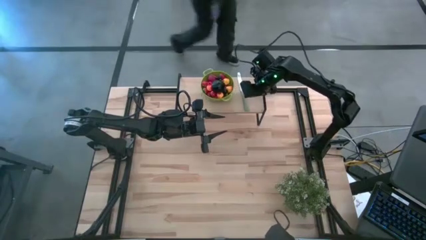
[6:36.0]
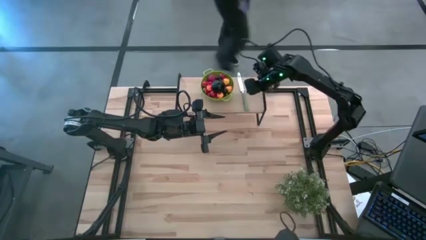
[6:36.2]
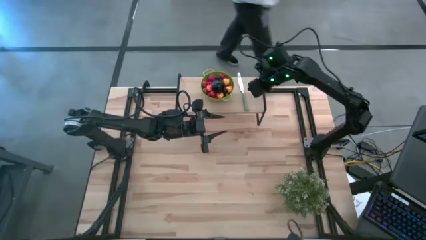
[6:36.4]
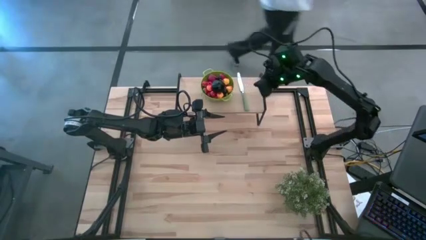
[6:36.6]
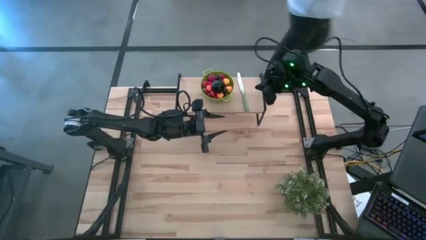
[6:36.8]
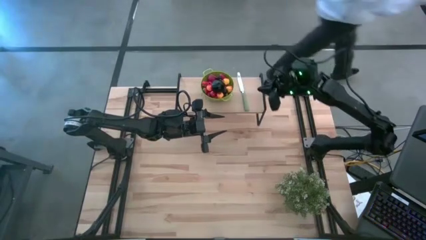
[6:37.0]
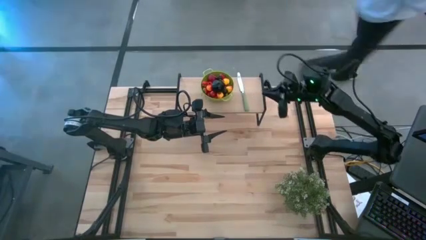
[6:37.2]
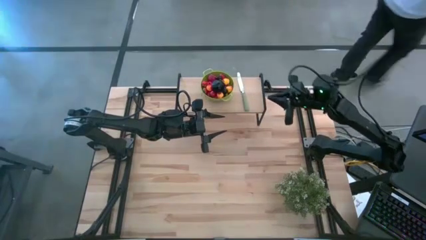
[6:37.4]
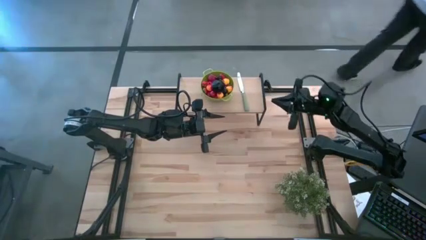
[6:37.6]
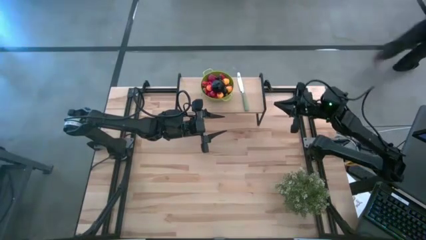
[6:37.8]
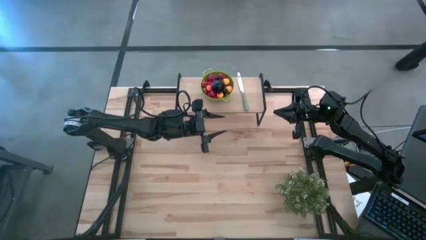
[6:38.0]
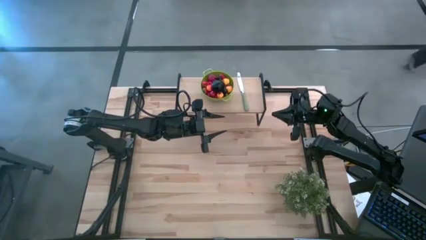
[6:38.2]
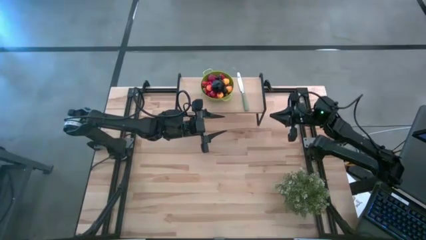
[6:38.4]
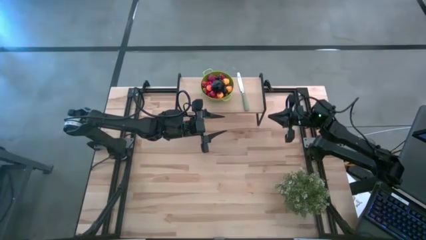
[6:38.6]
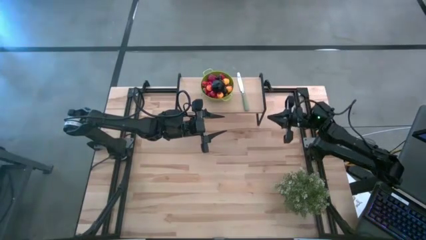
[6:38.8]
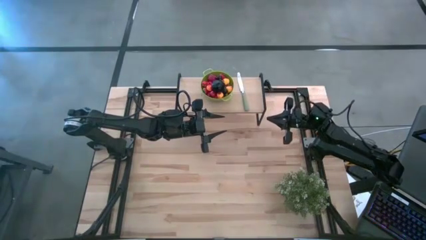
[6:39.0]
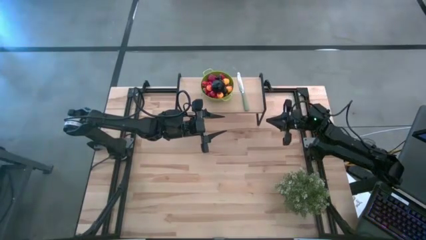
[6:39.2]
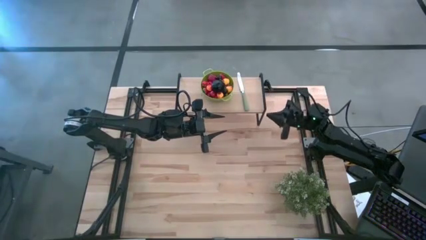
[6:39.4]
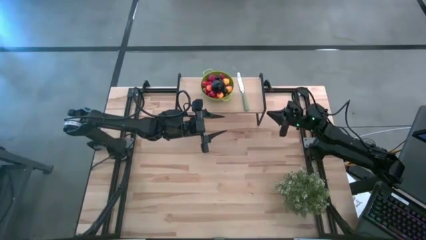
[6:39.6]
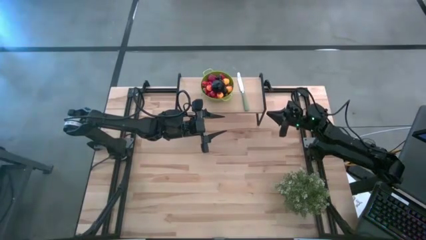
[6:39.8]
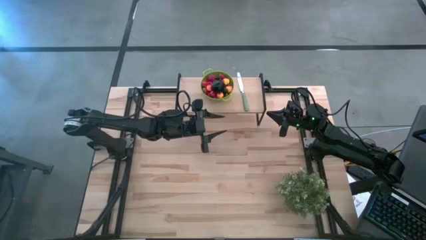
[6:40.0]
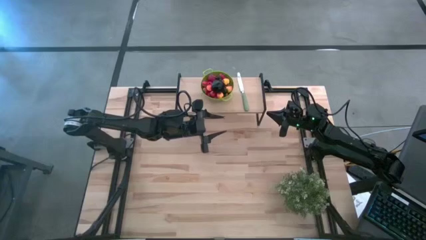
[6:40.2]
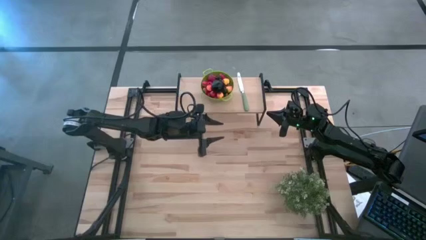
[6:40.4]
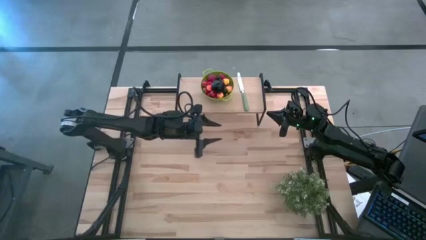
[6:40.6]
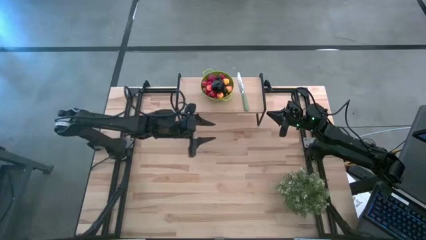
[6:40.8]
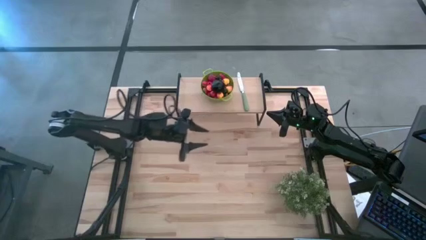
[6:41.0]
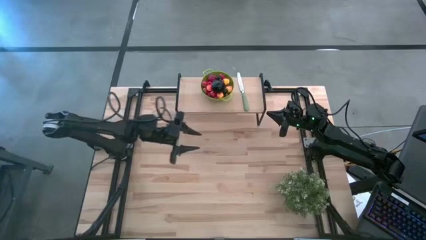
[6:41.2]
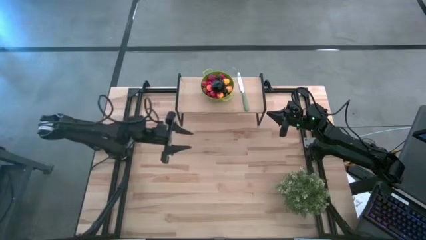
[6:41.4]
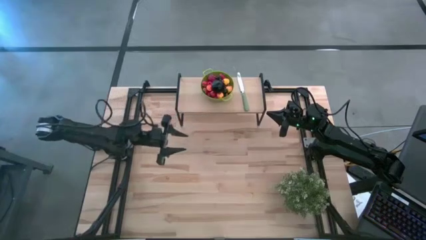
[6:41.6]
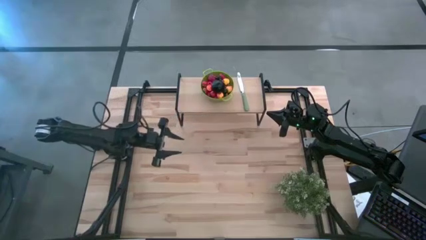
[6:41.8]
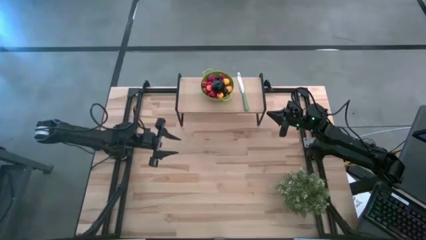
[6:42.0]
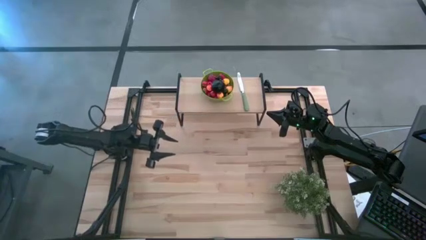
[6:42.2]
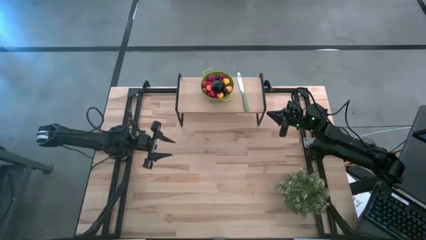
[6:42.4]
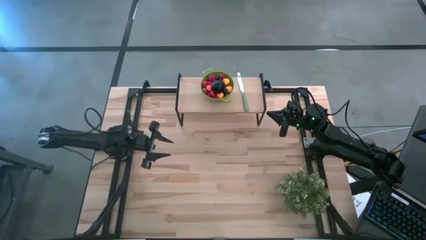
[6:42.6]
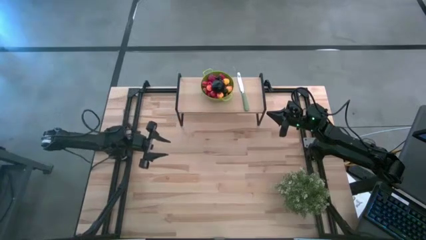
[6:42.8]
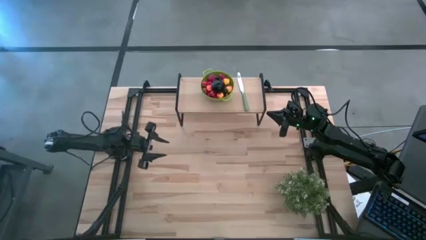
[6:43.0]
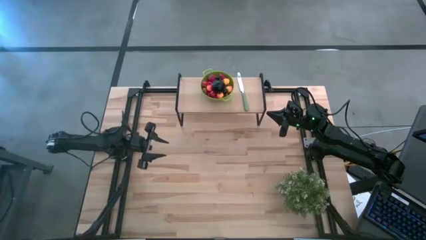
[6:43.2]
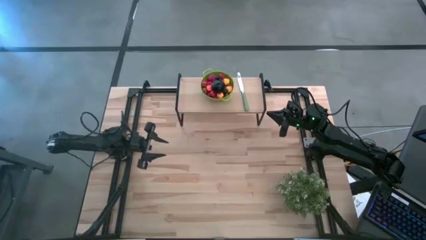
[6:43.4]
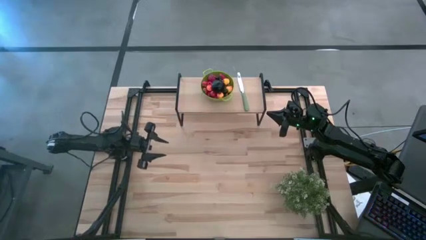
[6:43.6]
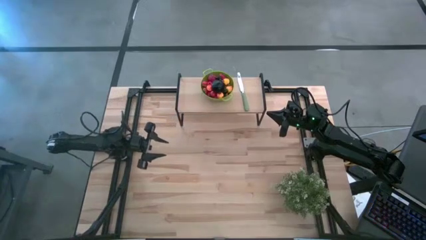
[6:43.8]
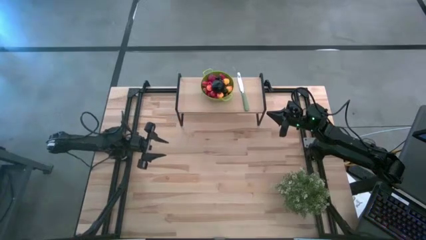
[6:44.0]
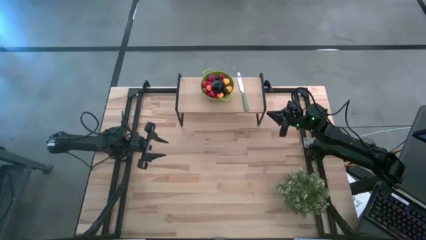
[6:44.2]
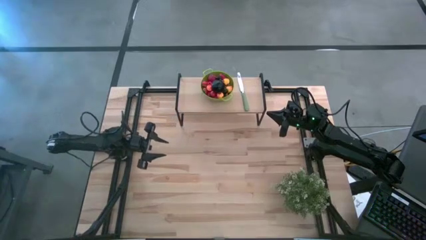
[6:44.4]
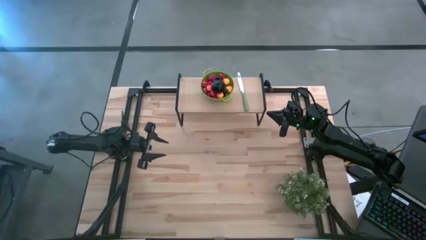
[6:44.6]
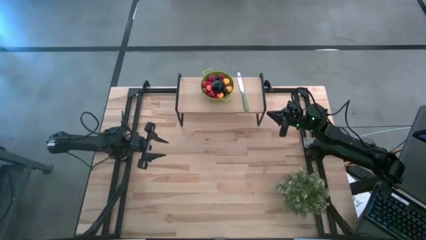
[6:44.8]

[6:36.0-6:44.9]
Task: Pick & Place Fruit
Return to Home Position

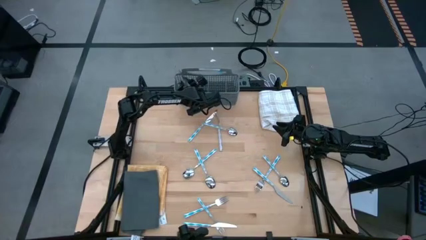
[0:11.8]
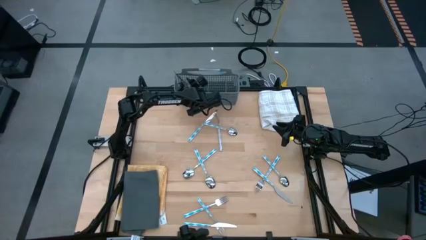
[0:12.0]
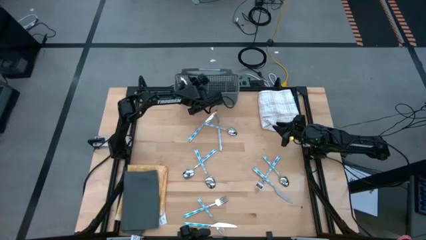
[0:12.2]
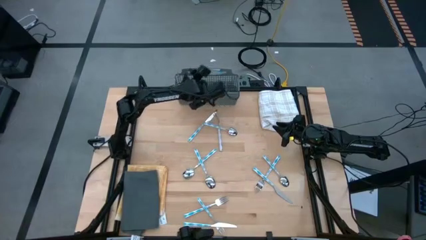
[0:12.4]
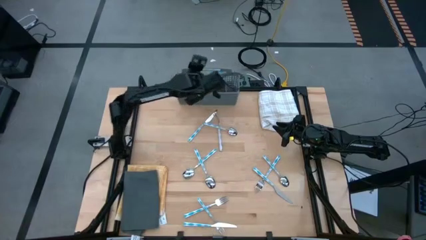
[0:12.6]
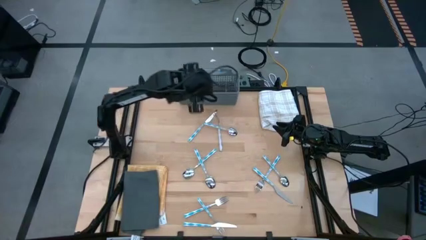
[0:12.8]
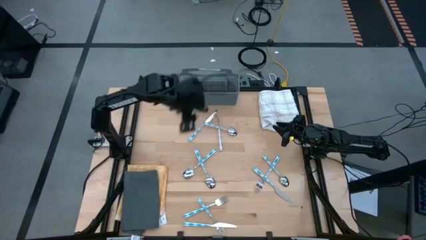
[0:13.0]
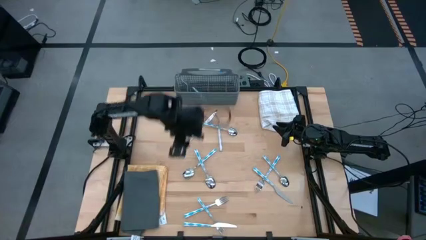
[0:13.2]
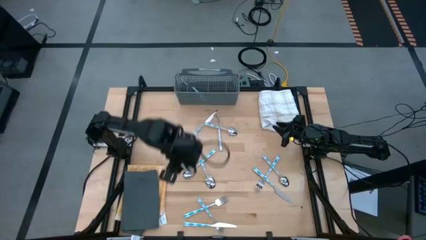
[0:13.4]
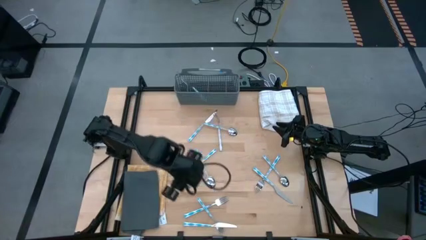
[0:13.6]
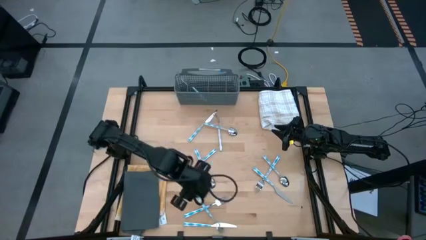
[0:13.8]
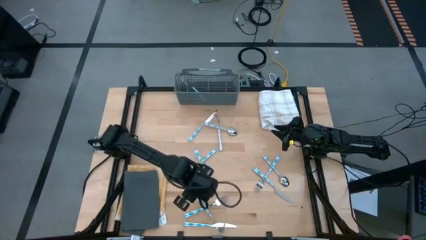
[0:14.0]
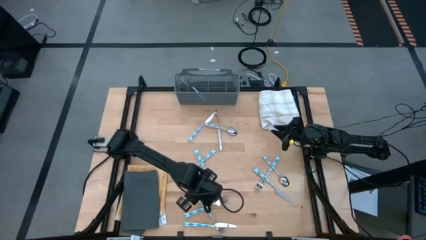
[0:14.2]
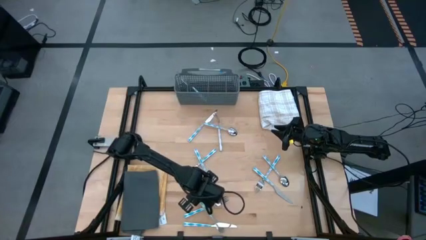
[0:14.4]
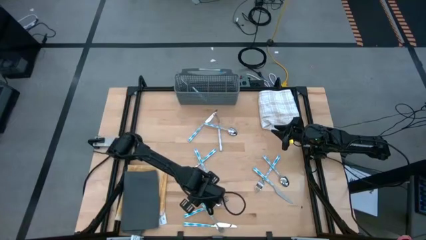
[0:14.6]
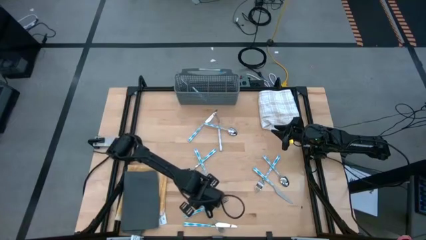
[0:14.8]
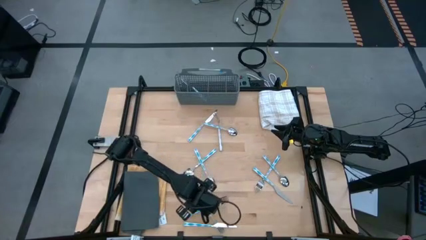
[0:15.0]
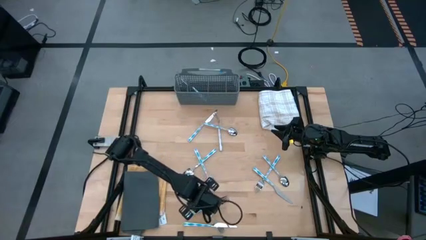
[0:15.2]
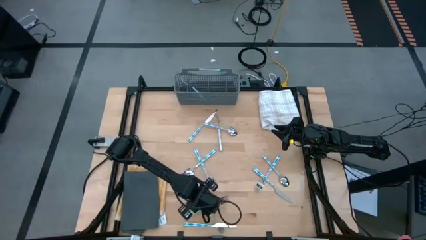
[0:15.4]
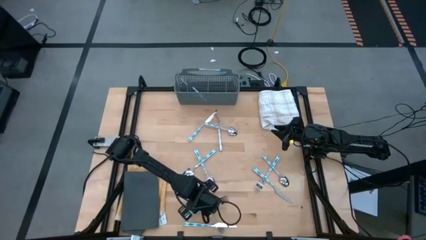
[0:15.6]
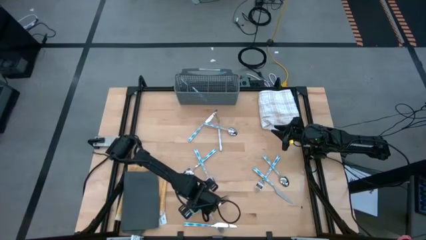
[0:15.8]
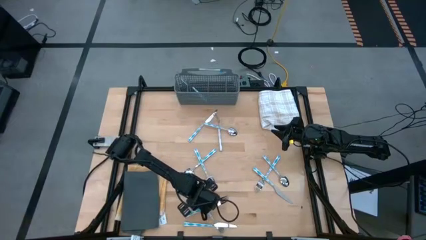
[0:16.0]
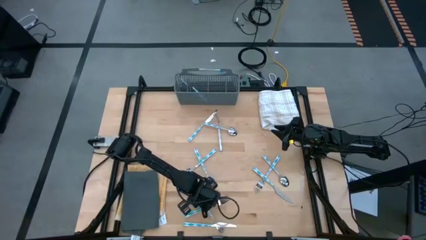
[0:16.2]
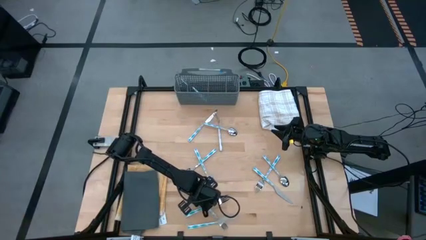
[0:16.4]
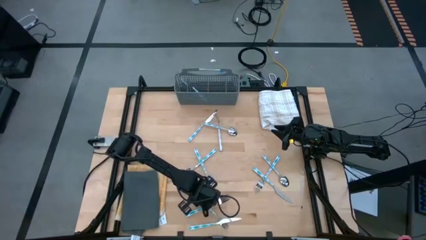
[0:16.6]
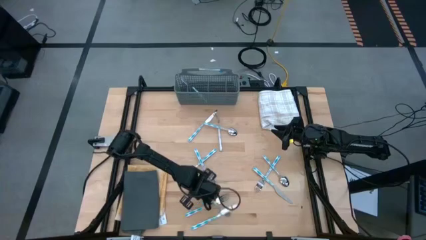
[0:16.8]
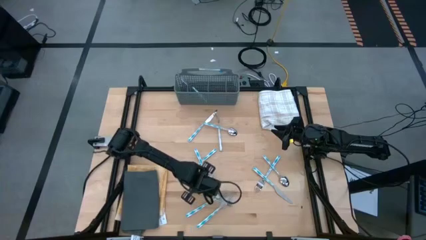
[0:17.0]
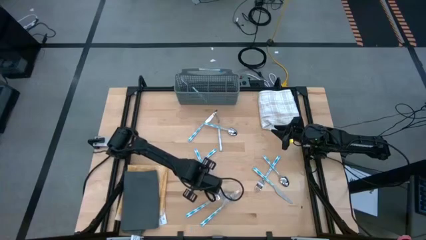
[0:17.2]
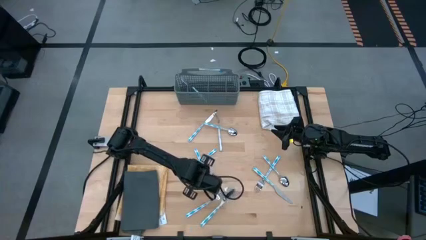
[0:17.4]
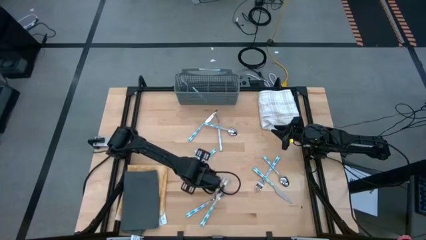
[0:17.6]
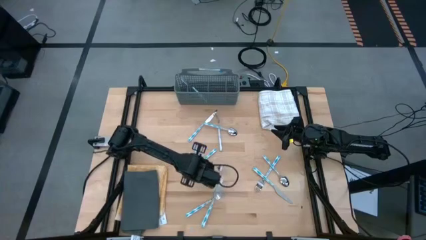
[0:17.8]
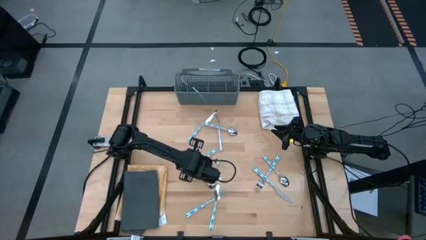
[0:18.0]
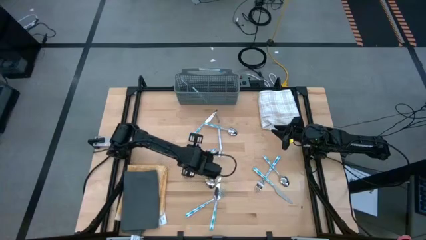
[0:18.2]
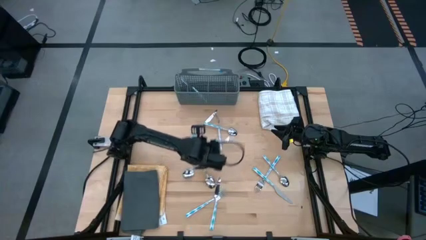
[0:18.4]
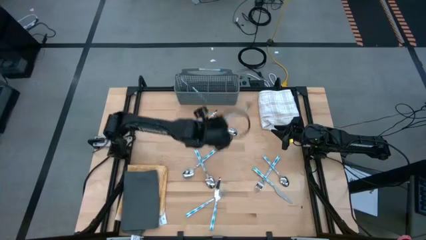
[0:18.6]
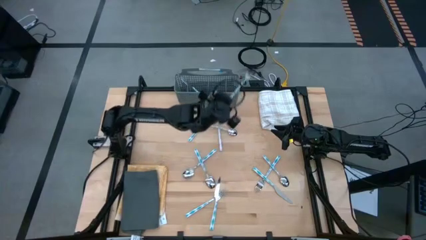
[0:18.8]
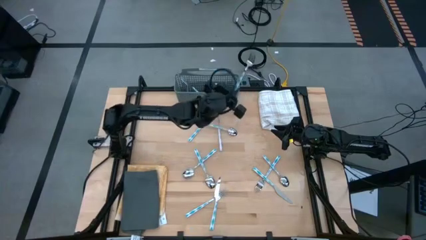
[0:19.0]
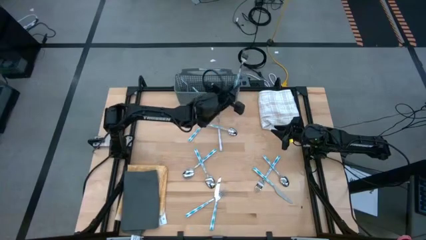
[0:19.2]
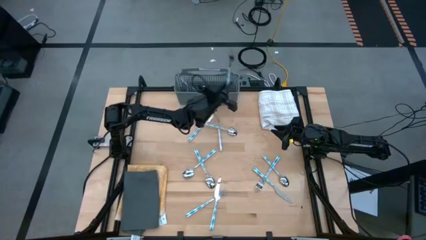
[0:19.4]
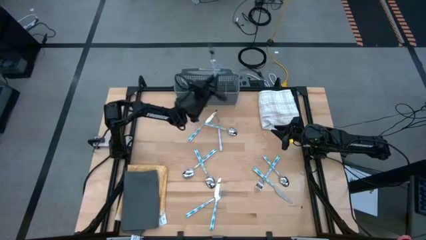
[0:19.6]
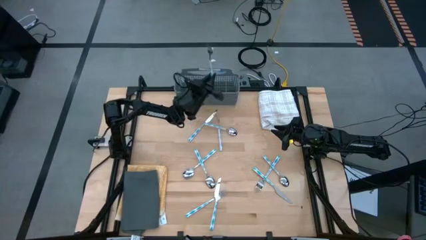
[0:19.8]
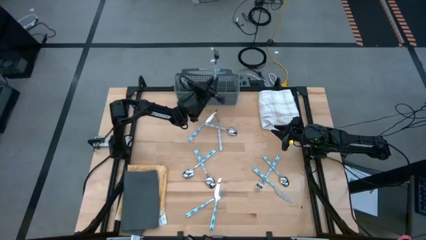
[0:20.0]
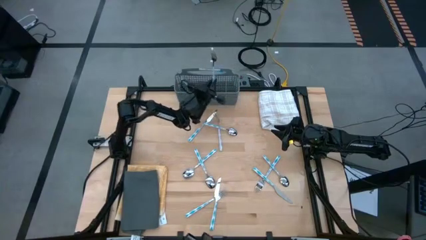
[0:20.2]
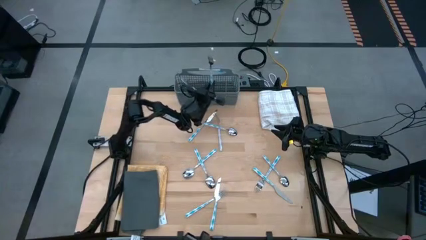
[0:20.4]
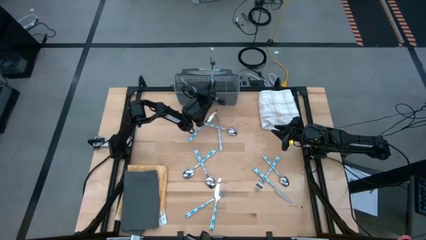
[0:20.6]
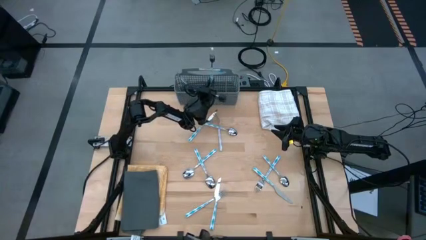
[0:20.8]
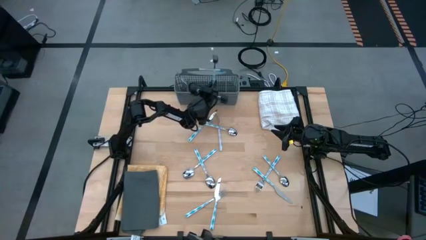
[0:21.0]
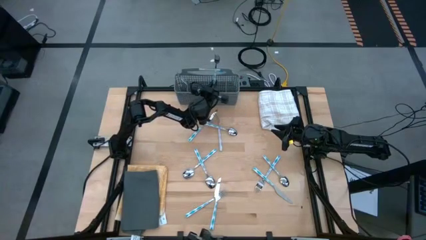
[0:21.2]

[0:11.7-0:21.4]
Task: Sort silverware
Put the blue fork into the gray silverware rack
